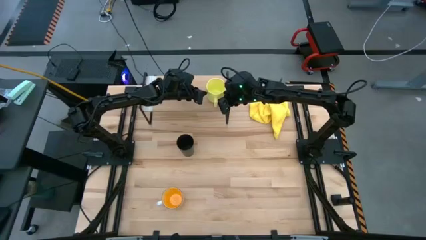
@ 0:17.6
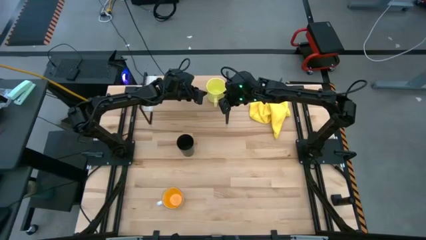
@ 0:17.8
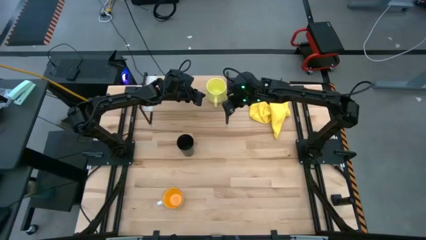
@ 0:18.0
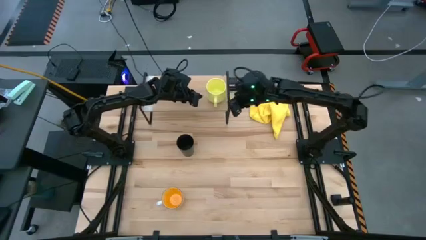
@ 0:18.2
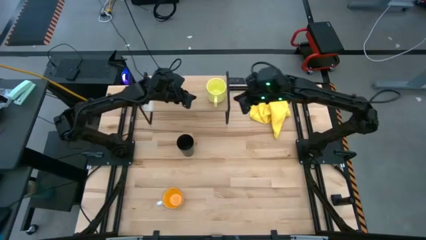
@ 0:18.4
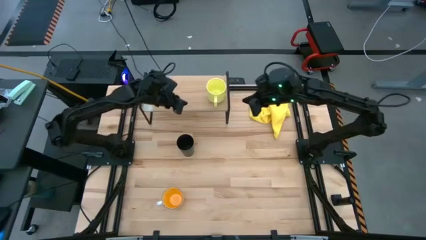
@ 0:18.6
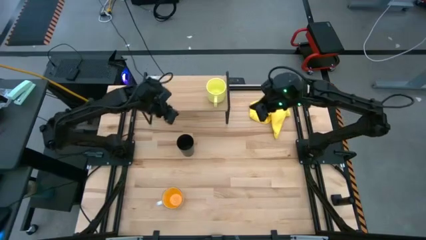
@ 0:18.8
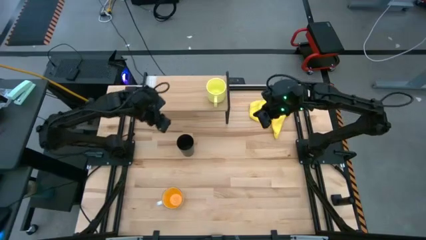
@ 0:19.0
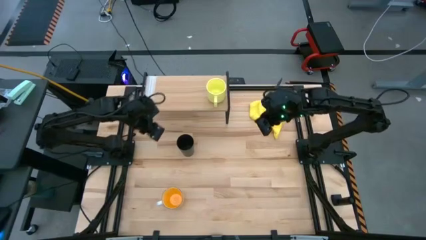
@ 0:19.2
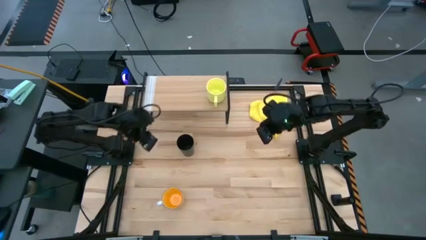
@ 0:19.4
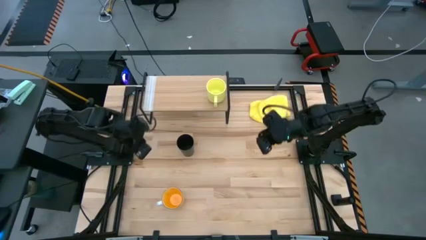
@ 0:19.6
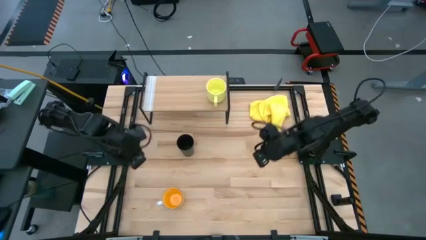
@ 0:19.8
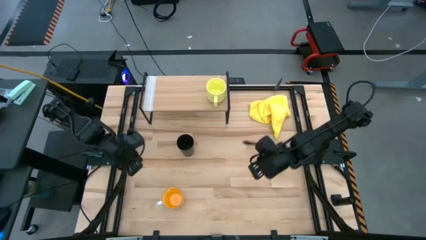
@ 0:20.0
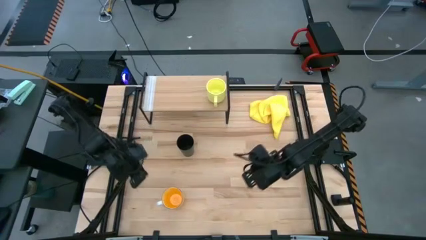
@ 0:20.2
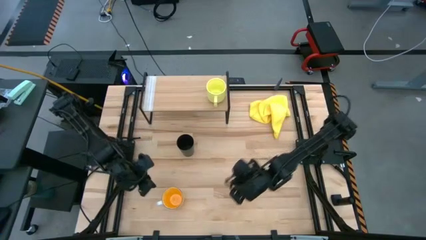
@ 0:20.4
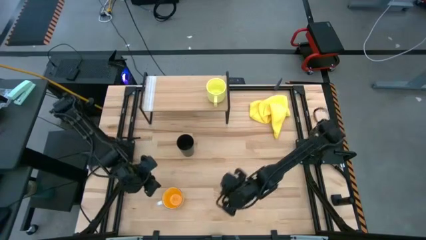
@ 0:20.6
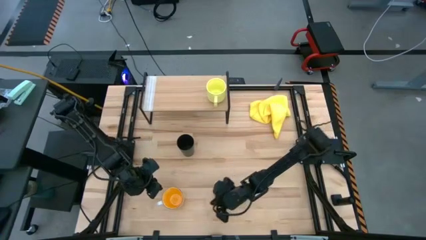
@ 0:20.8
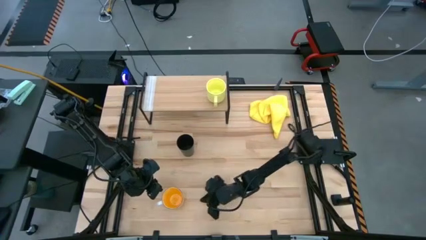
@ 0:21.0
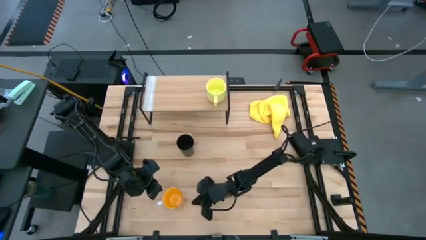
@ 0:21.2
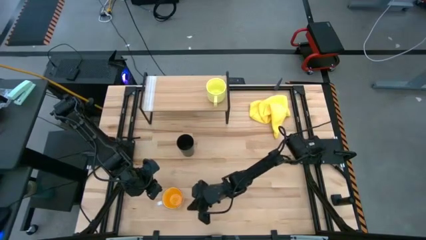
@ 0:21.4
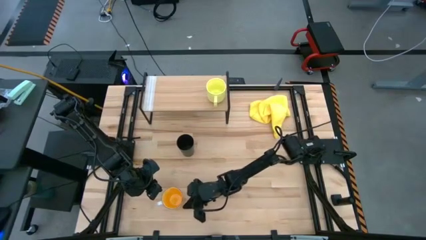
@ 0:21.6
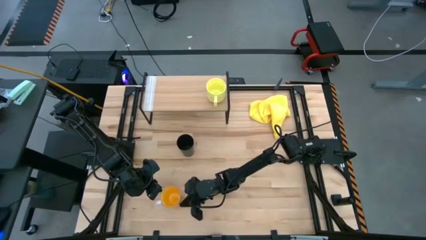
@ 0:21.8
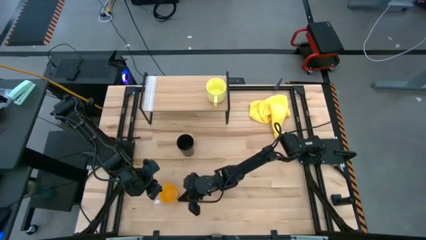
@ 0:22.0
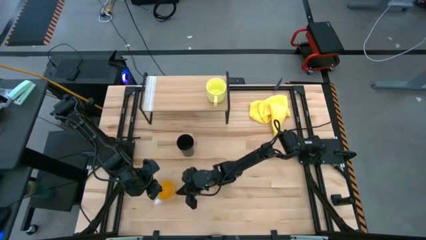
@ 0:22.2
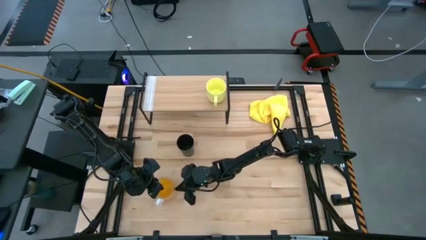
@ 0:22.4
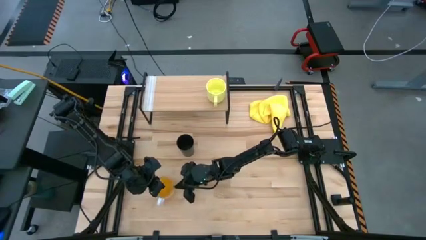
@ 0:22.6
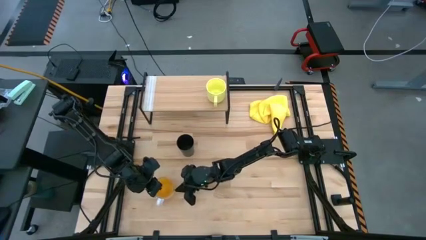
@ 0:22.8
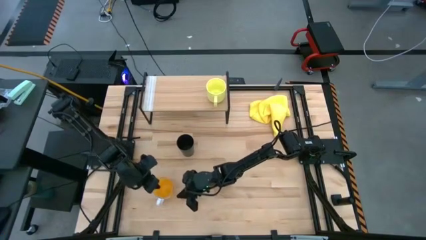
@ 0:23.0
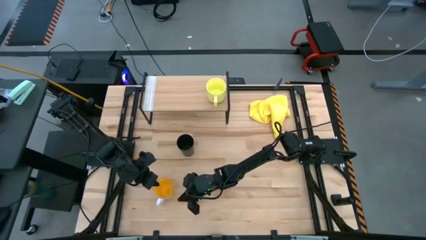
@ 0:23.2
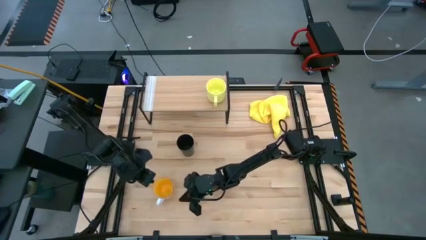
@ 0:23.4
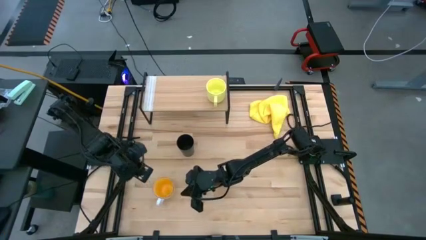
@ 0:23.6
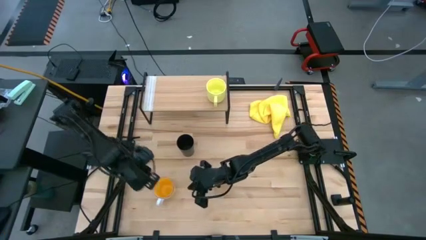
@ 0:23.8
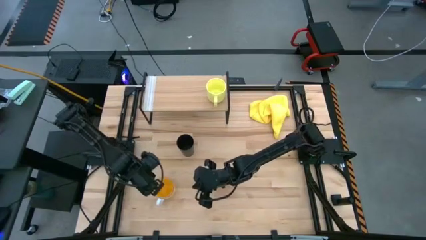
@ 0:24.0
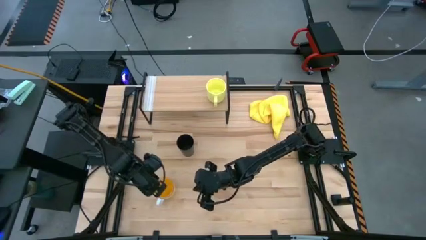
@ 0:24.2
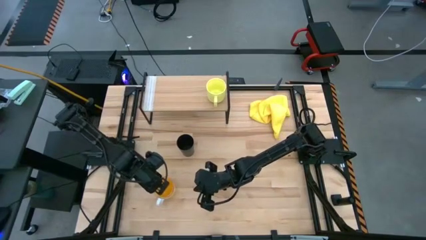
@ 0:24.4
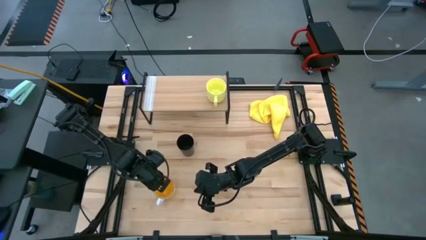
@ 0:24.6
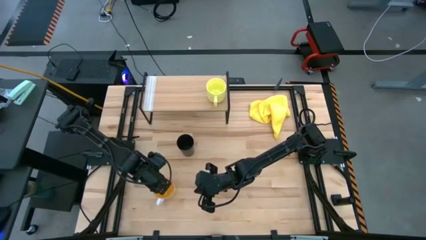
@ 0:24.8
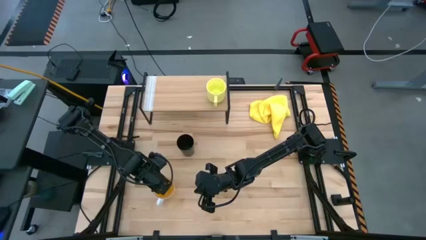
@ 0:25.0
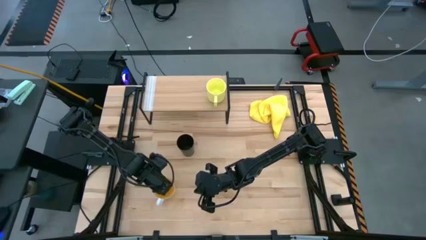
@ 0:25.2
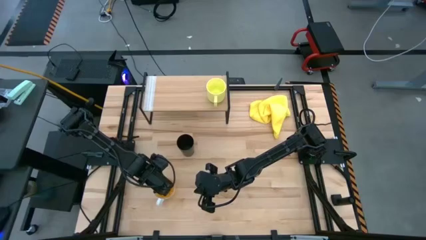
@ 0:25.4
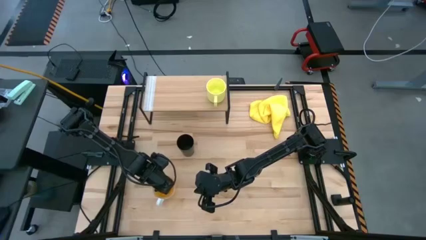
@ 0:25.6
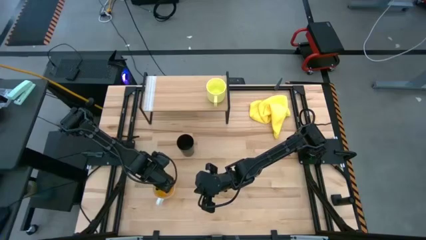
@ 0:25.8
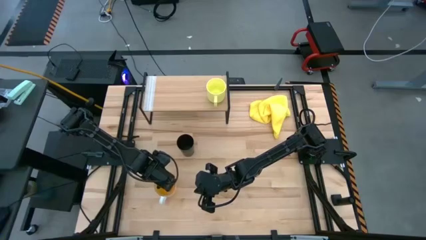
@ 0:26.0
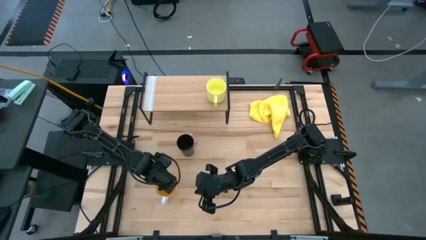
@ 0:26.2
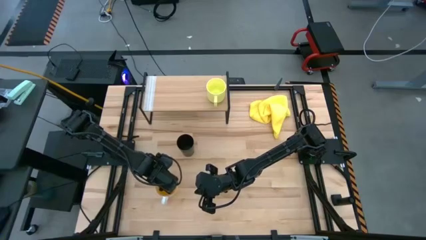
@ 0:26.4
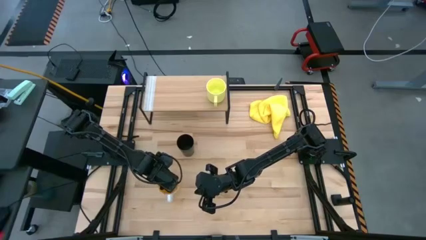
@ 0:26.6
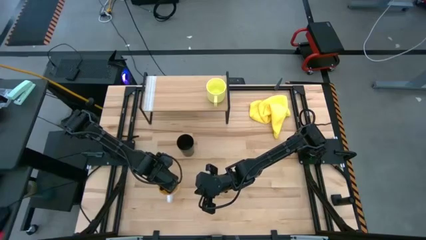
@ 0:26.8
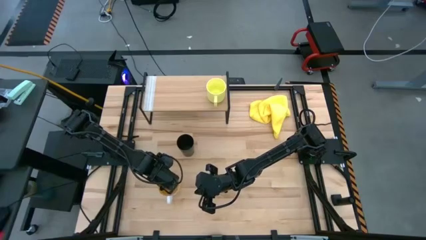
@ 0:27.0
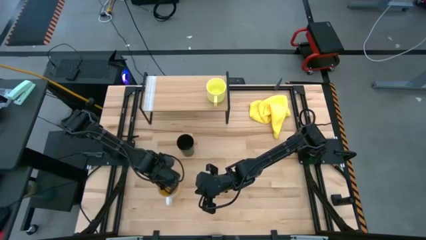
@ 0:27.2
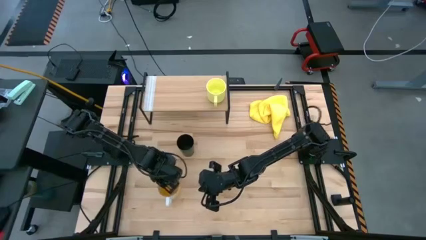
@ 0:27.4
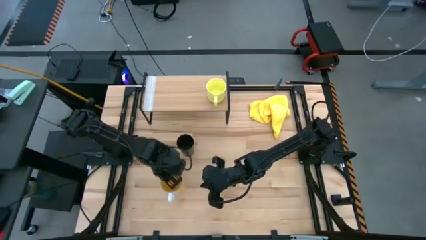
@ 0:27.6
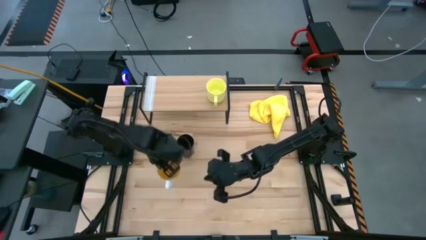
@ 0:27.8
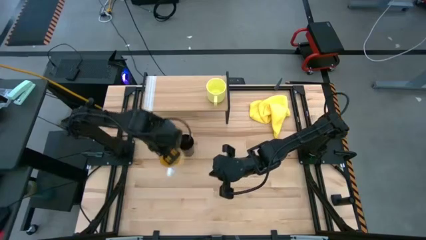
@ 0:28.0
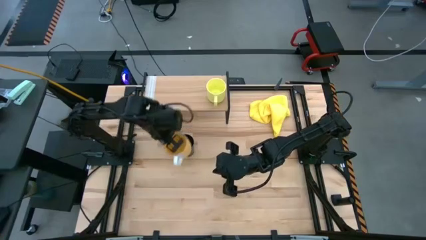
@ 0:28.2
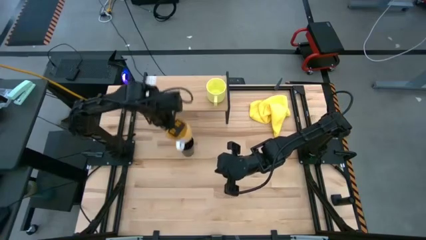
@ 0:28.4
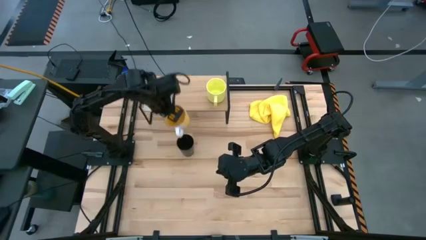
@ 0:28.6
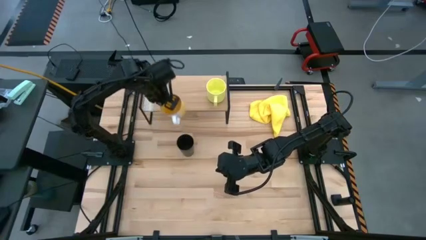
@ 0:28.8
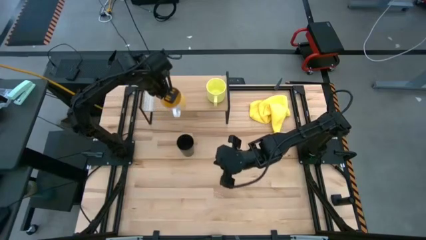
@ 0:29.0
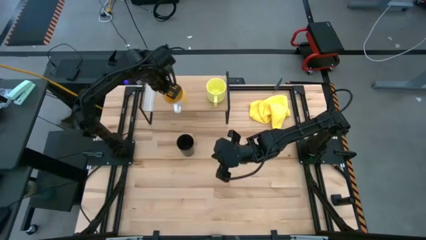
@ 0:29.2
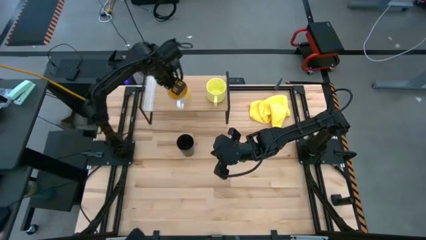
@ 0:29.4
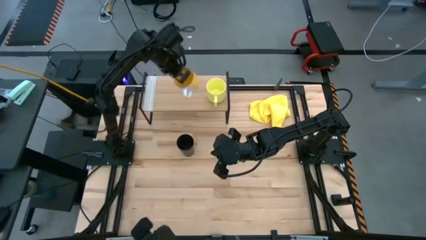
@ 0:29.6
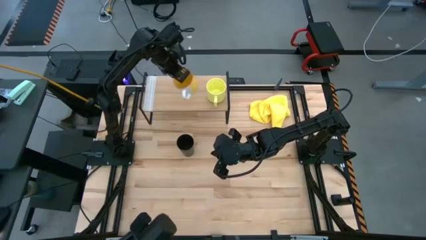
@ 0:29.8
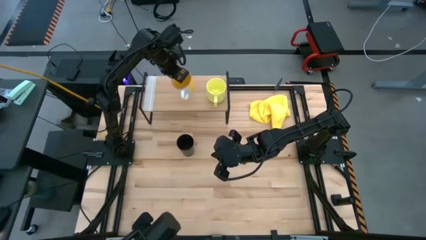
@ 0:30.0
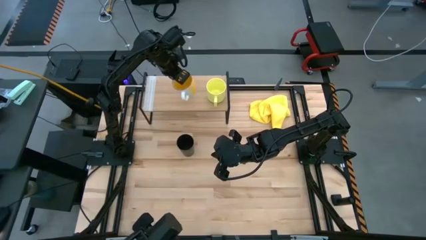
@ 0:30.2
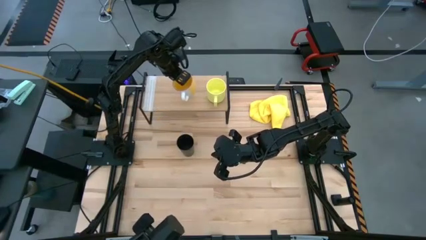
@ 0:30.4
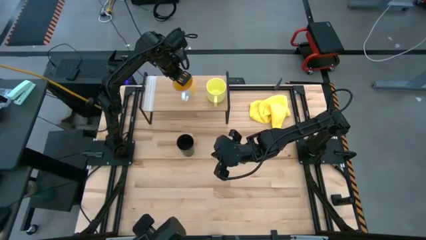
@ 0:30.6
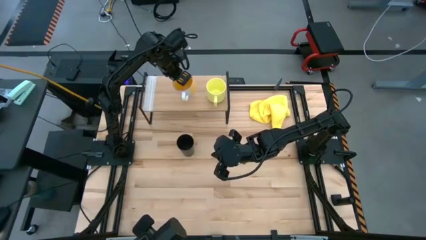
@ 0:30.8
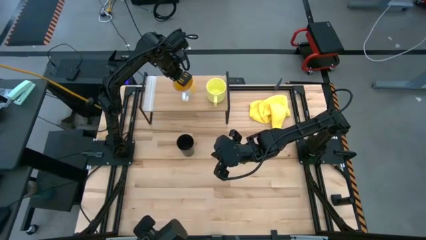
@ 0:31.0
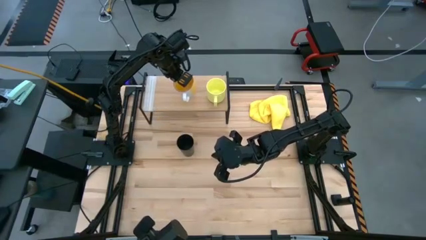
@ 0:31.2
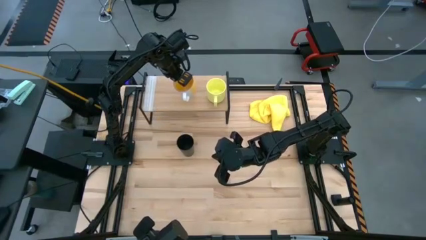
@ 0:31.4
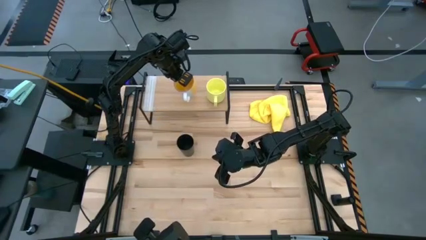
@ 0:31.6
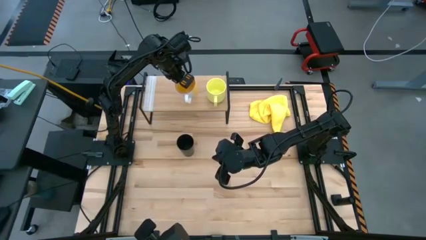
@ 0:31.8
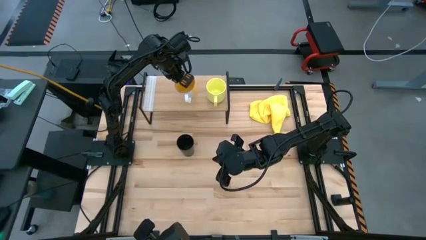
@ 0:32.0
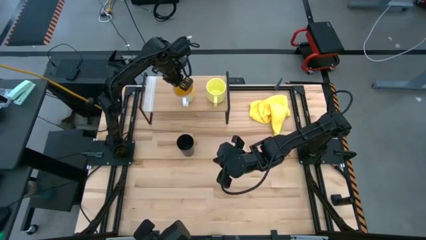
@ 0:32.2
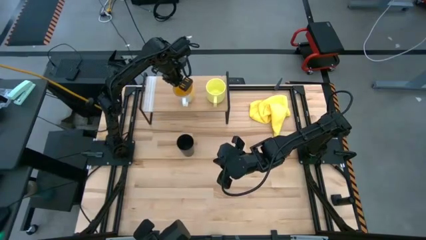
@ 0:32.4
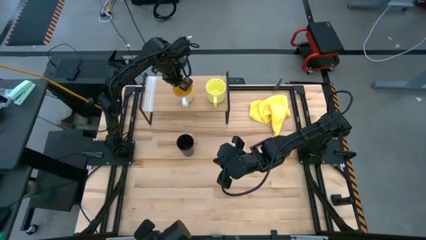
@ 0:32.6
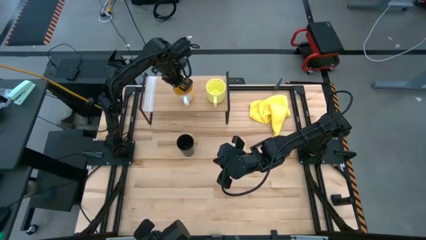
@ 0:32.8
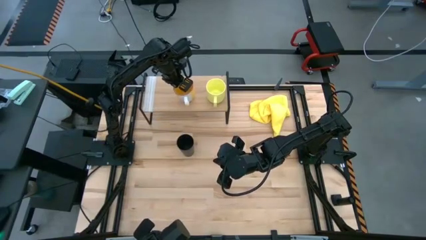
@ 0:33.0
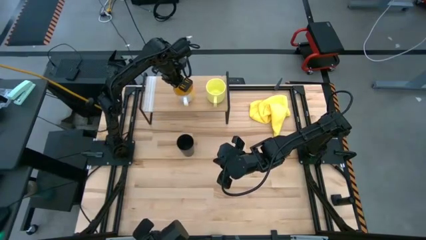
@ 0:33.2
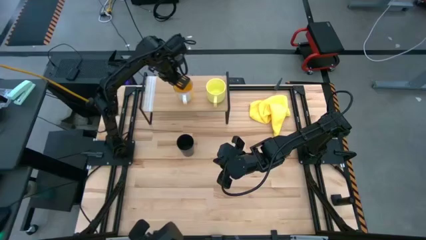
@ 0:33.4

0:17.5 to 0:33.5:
Task: Stack small to large cups/mugs on shelf
Put the orange mug on the shelf
